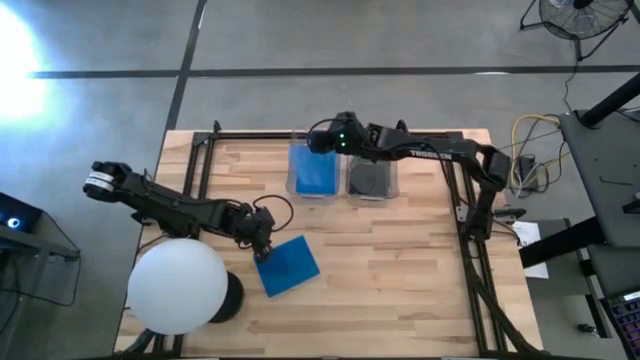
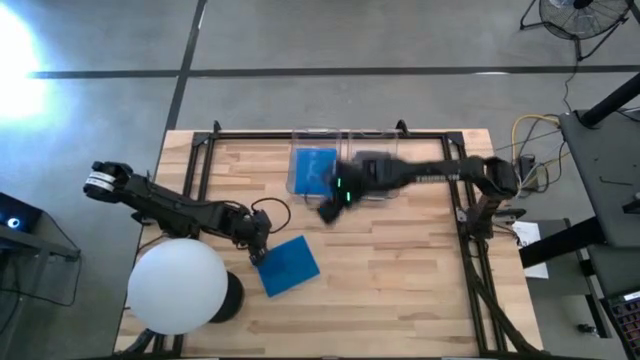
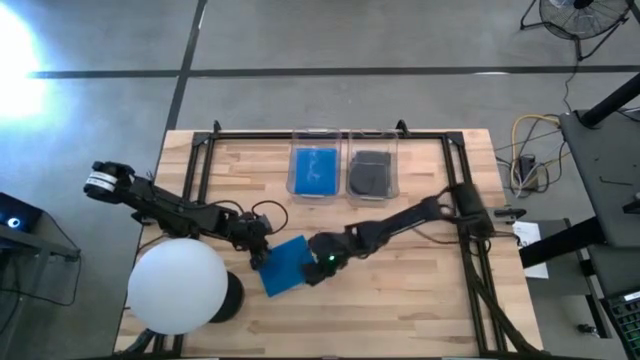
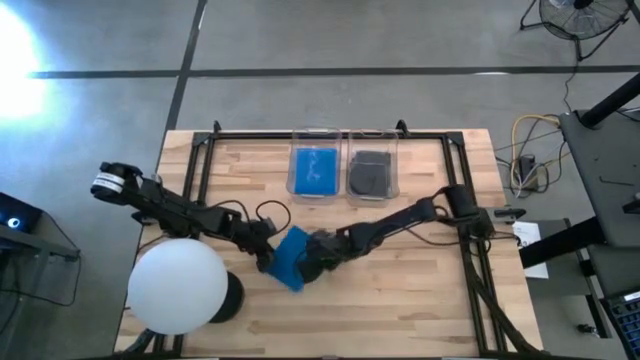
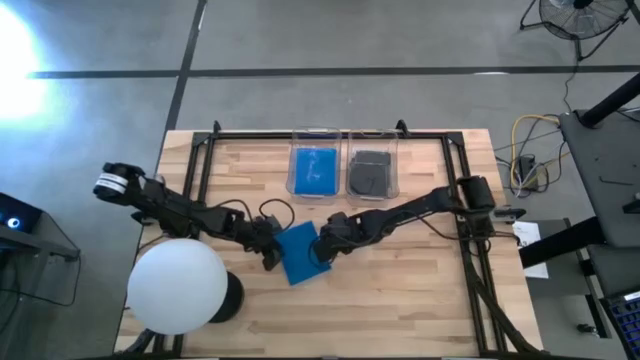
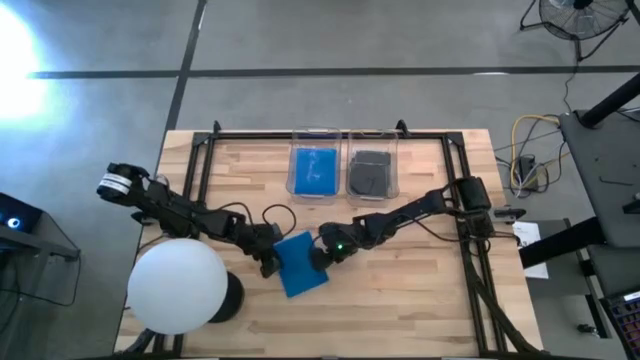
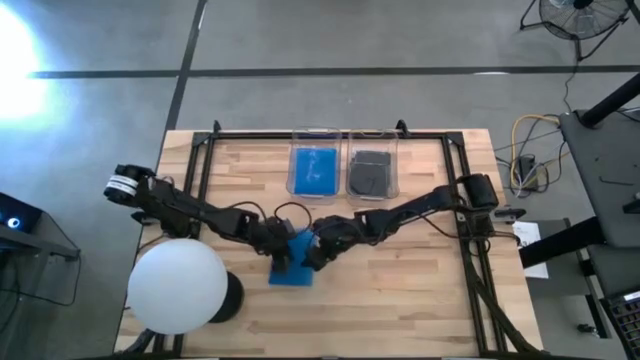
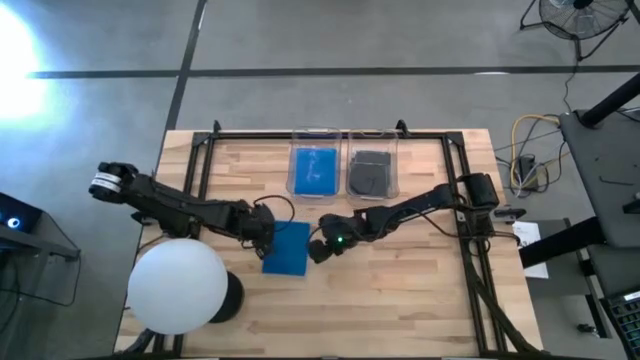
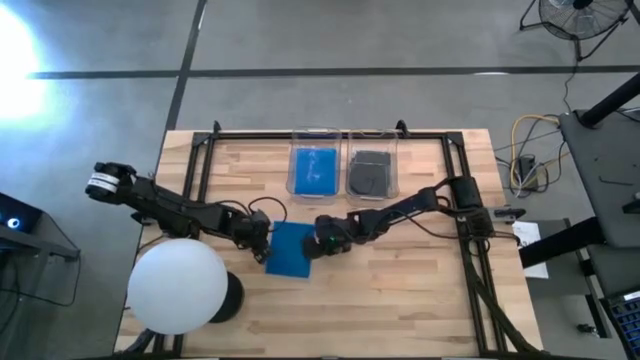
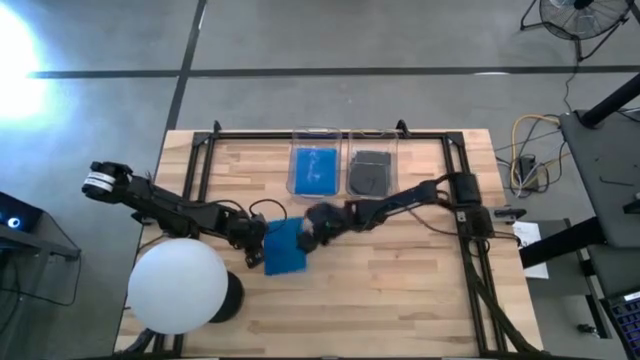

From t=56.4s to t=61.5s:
Task: Pick & place jewel cases by type
Put the blue CD case into the left transparent bin

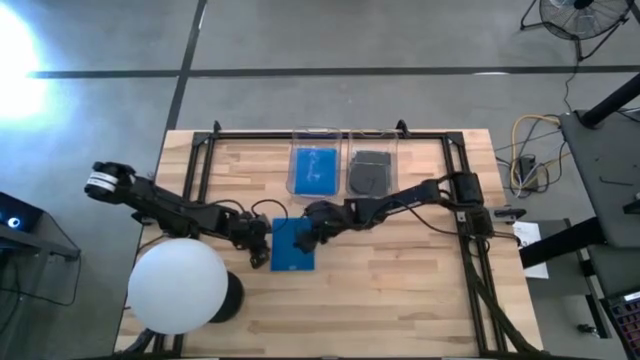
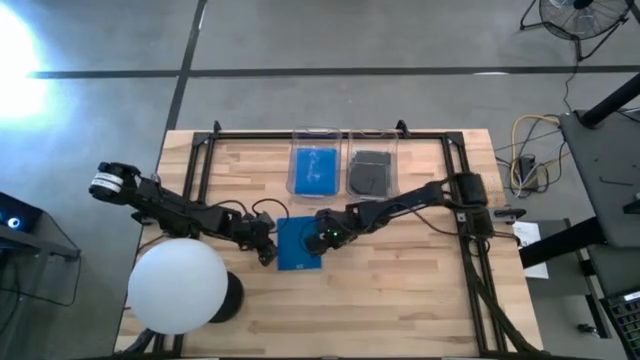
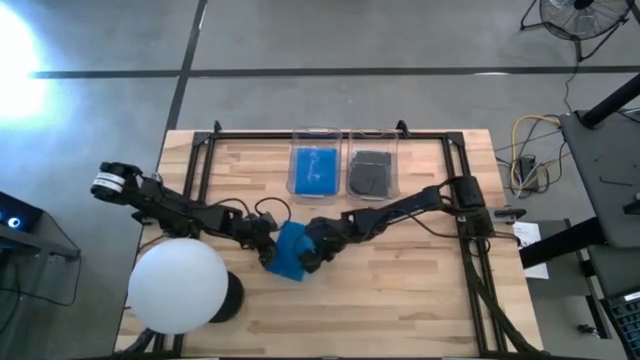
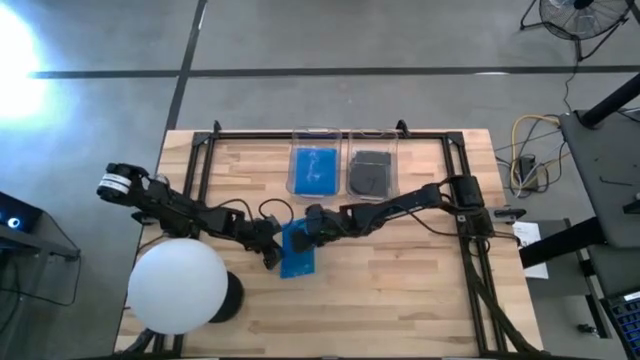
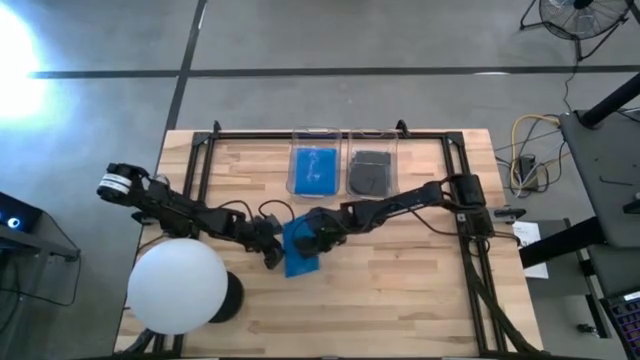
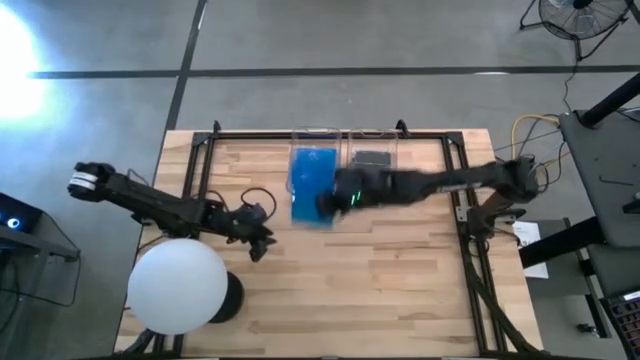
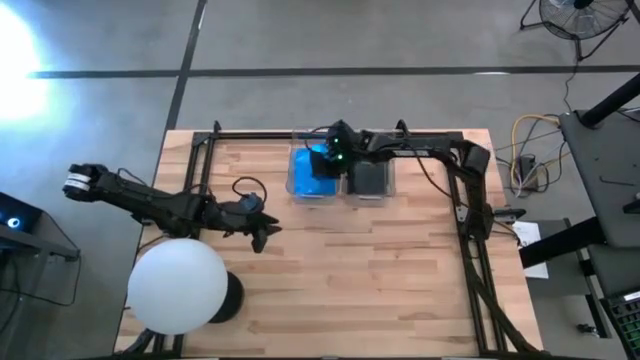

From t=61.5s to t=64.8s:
Put the blue CD case into the left transparent bin

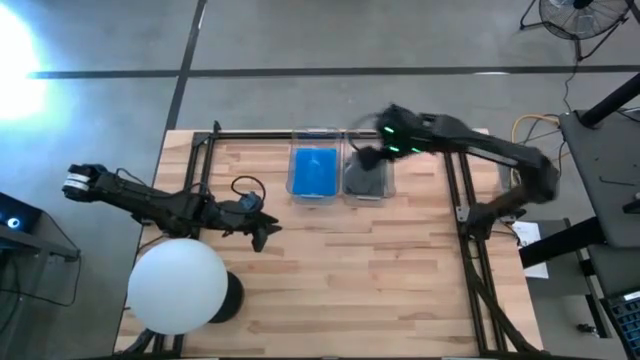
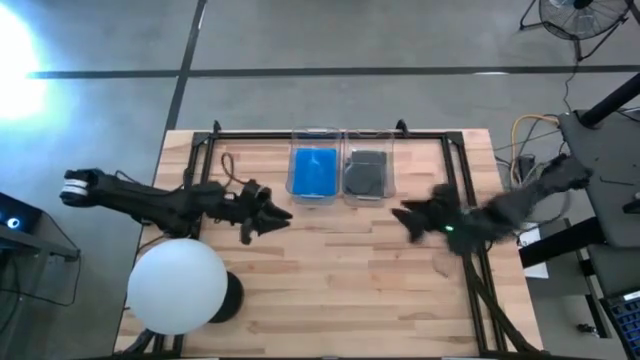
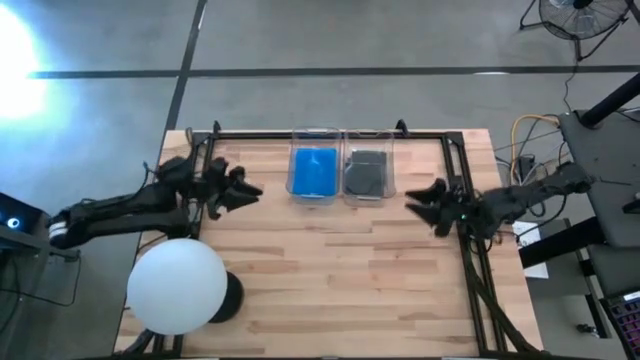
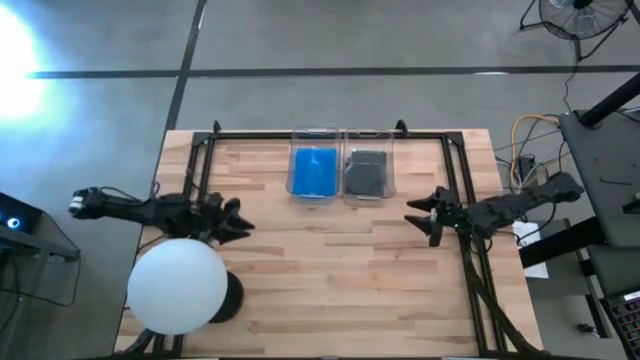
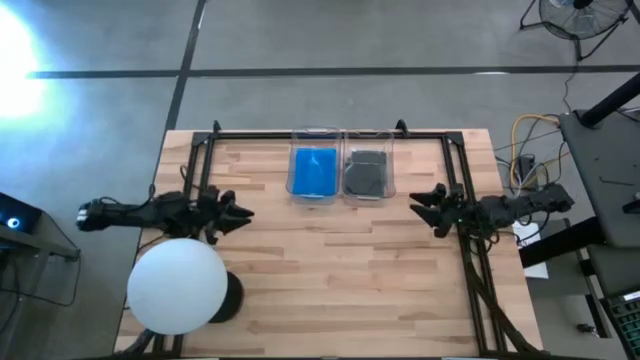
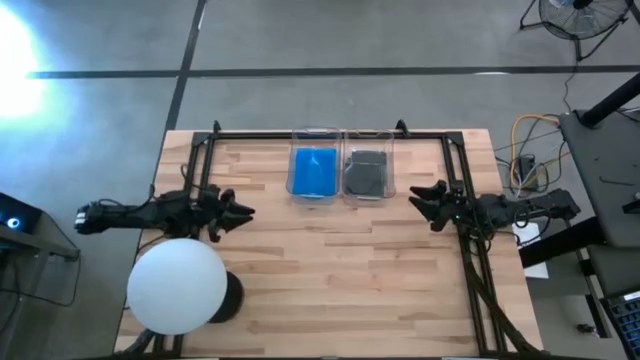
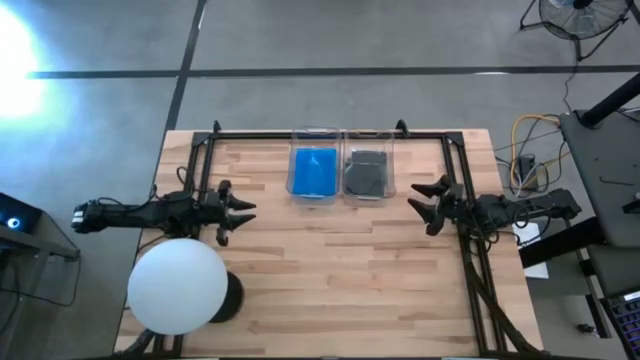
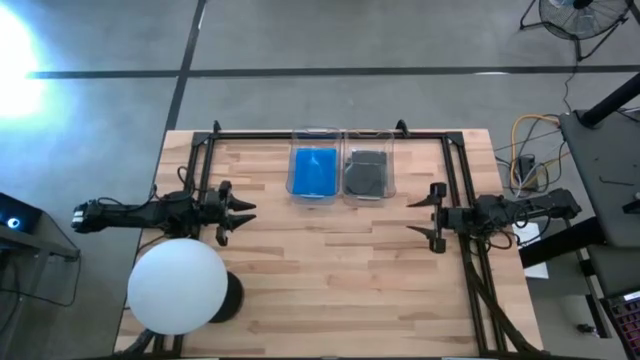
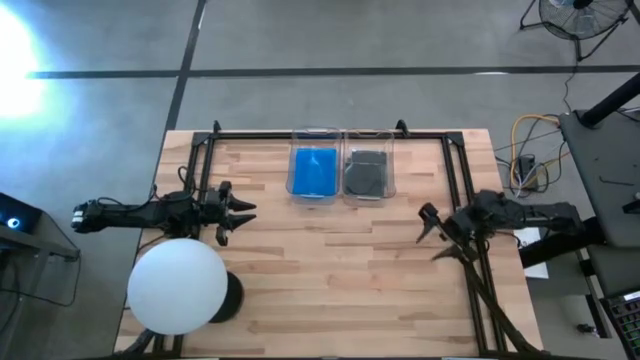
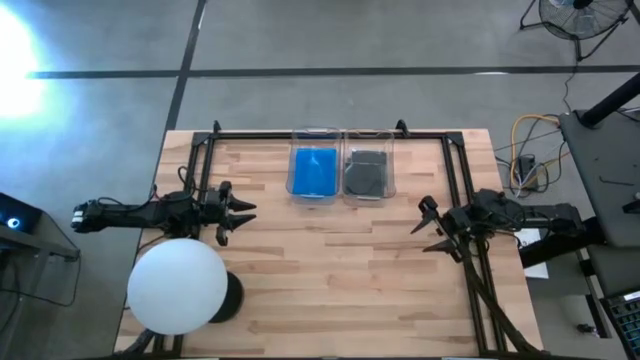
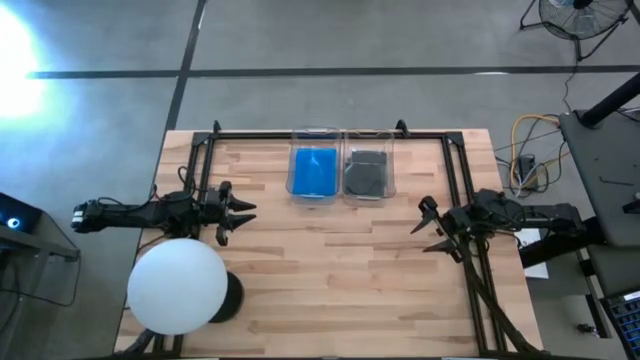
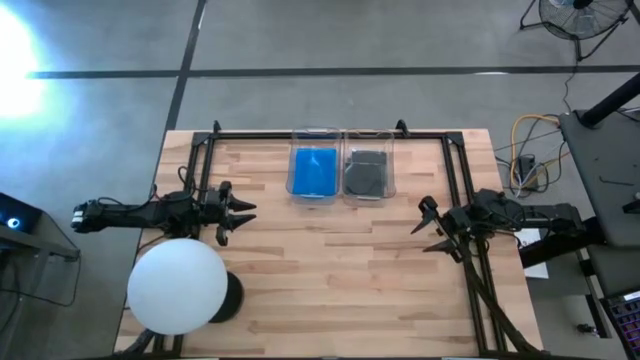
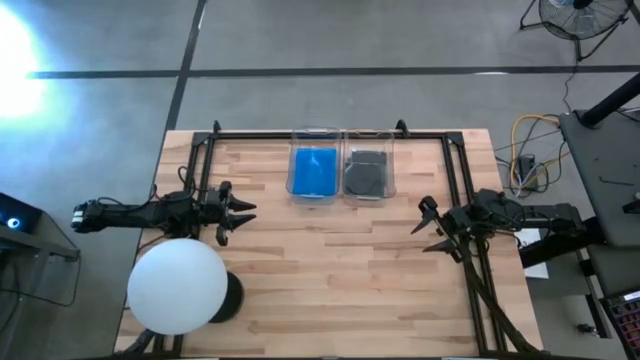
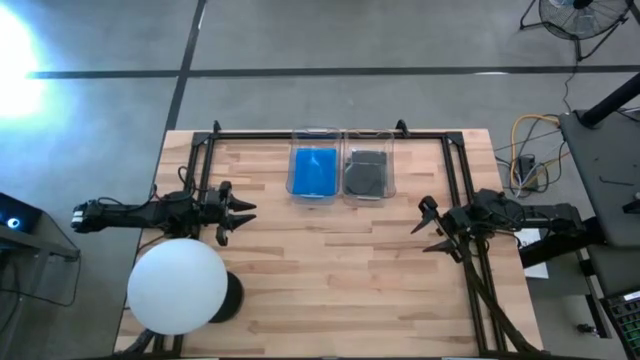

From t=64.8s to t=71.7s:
Return to Home Position

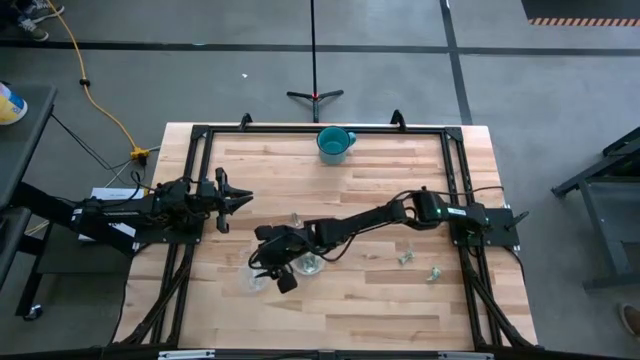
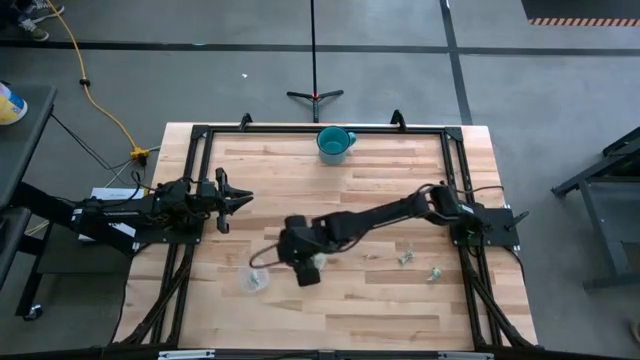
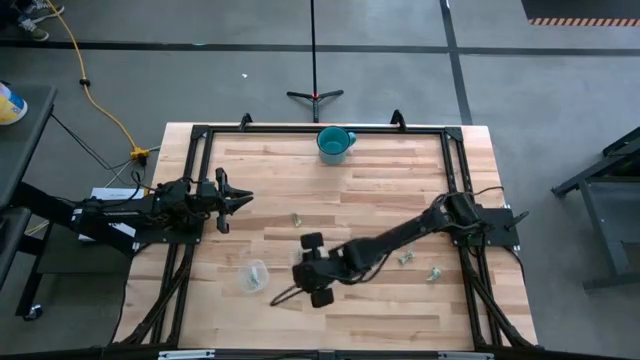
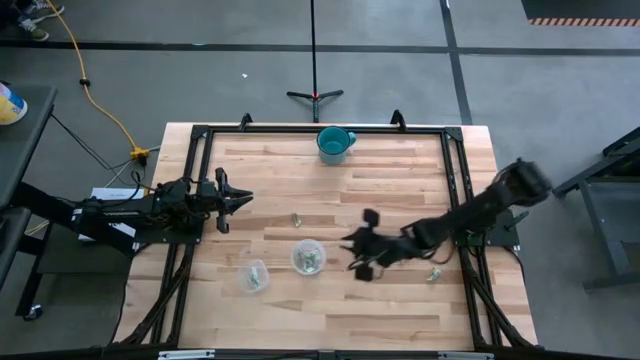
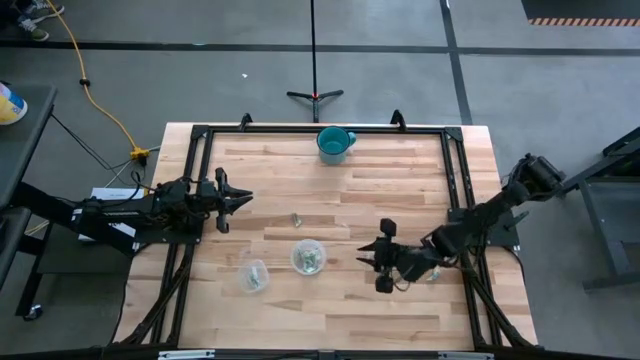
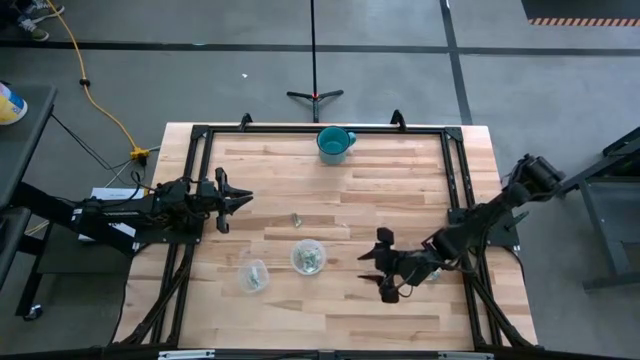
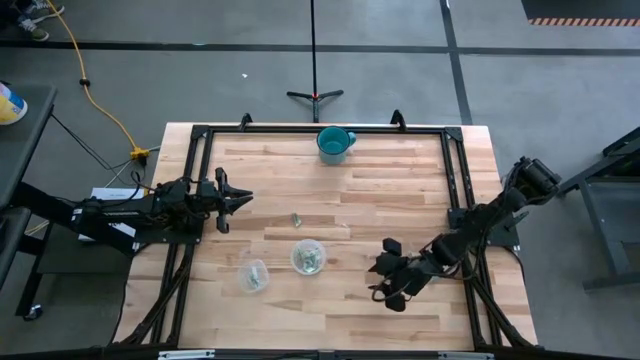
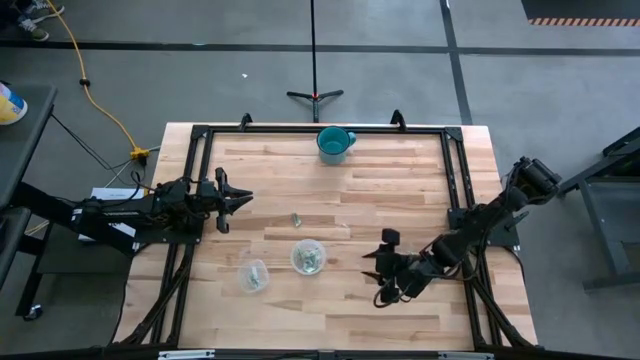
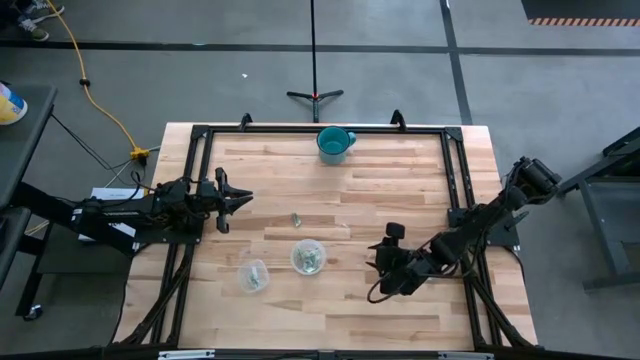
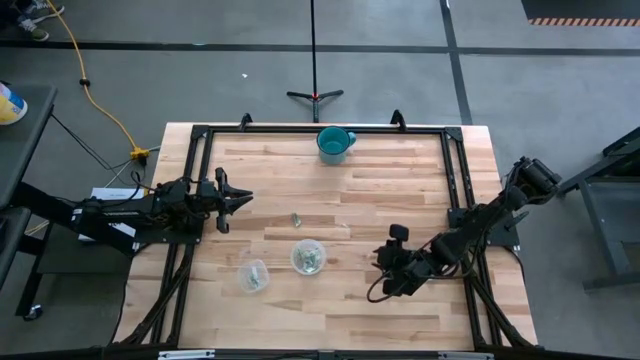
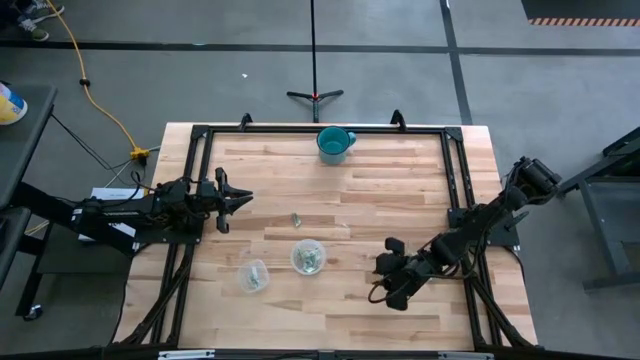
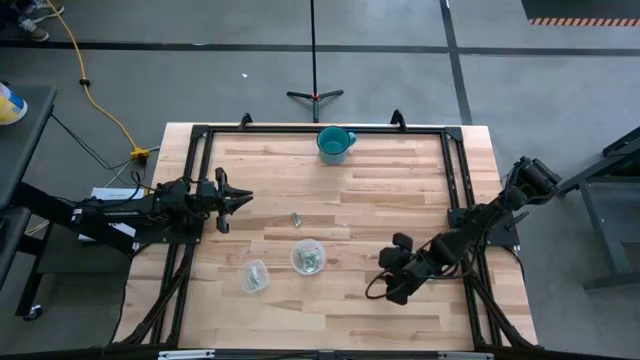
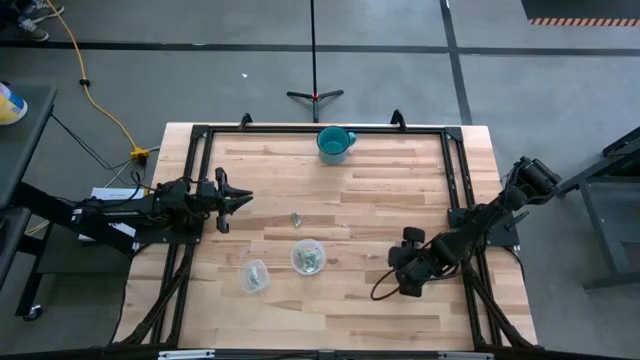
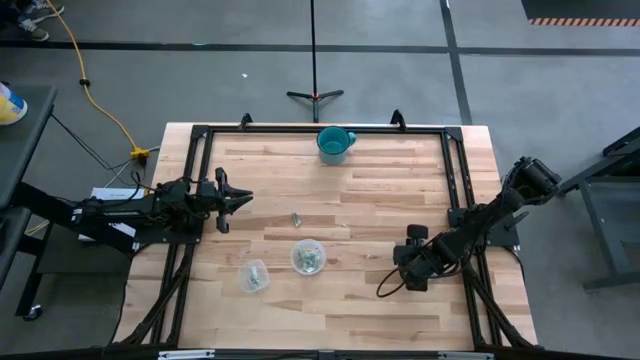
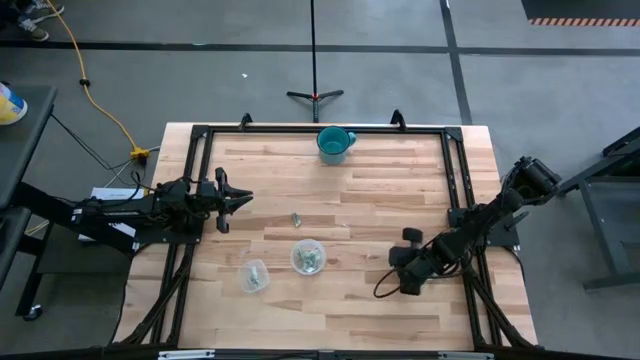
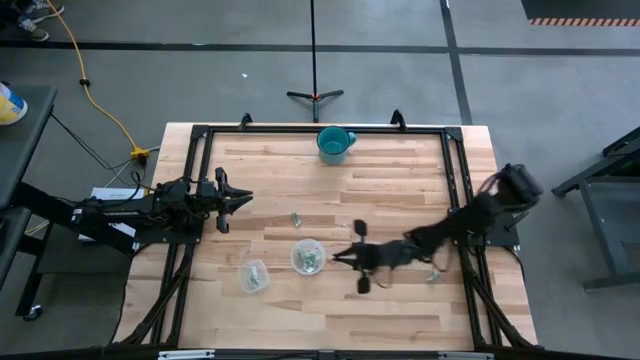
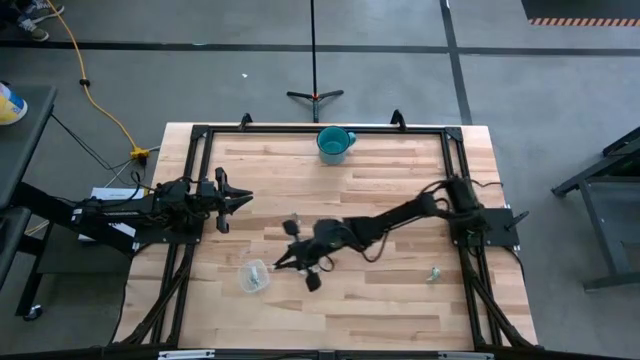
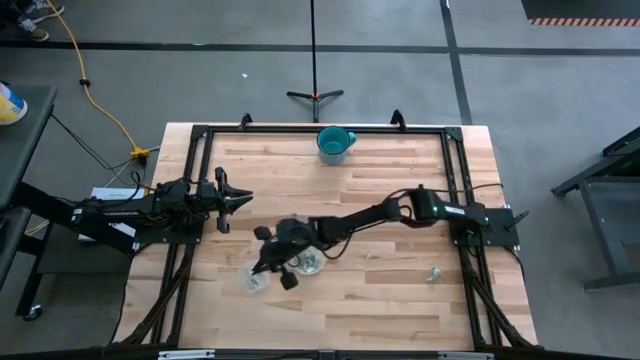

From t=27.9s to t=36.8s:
Task: Pick and place items into bin
Put the stevia packet into the left transparent bin
